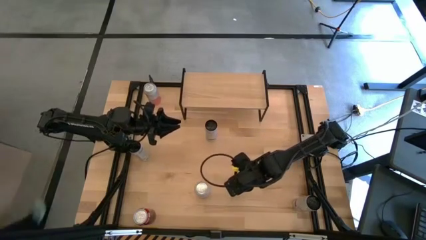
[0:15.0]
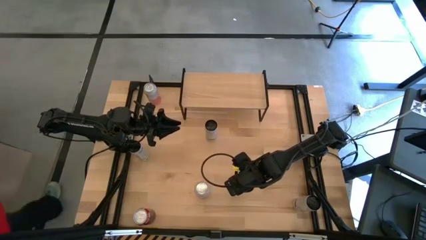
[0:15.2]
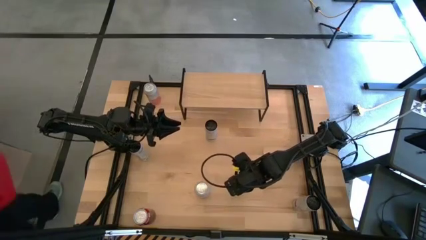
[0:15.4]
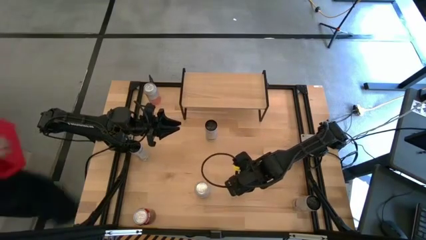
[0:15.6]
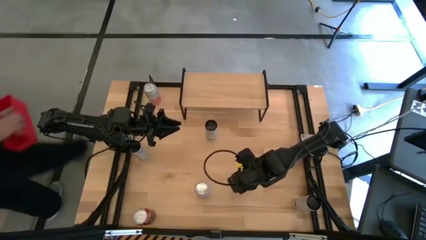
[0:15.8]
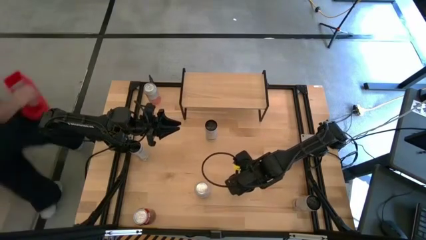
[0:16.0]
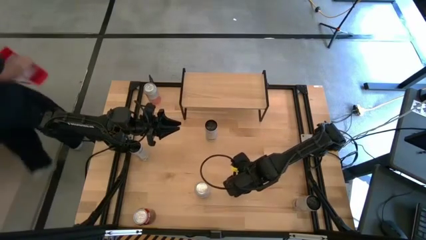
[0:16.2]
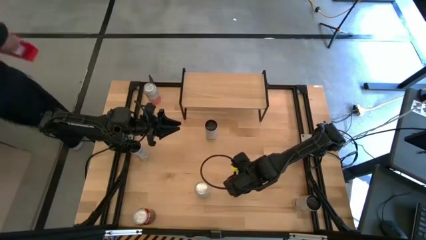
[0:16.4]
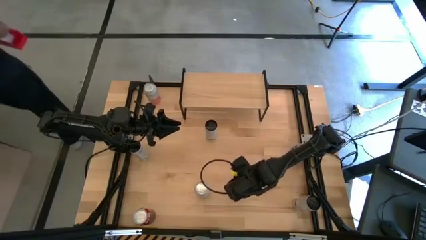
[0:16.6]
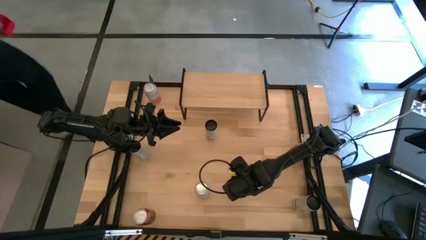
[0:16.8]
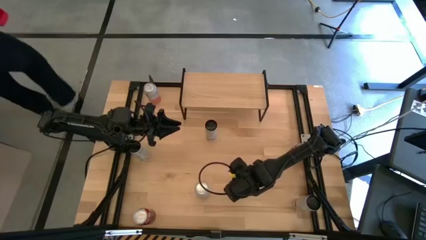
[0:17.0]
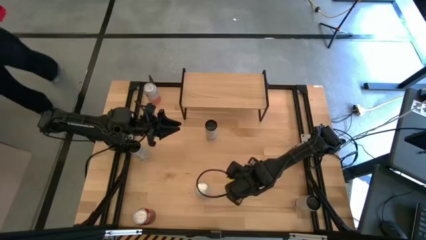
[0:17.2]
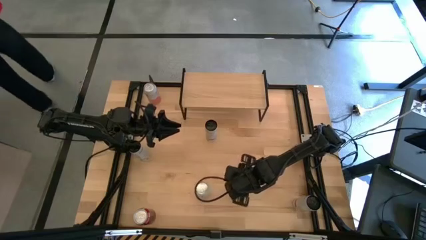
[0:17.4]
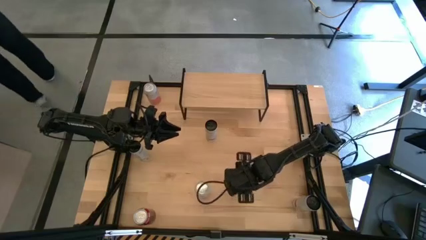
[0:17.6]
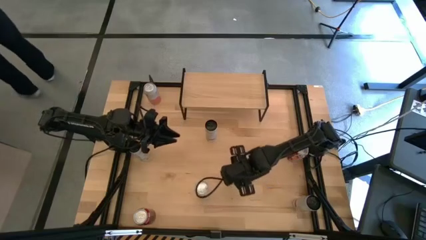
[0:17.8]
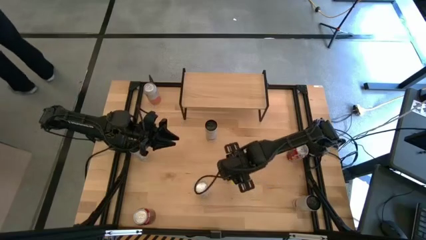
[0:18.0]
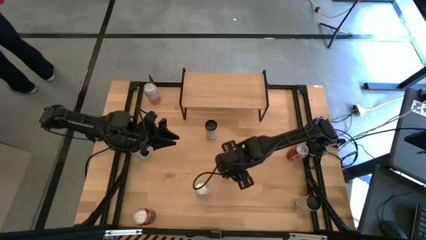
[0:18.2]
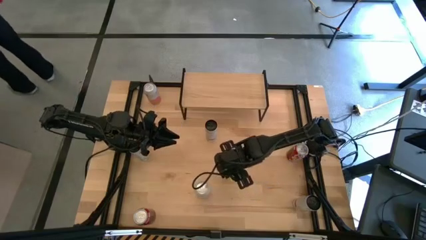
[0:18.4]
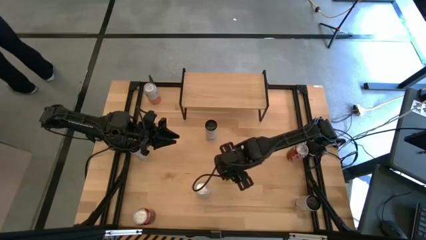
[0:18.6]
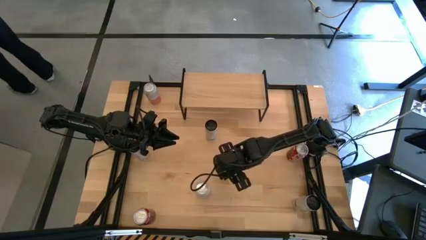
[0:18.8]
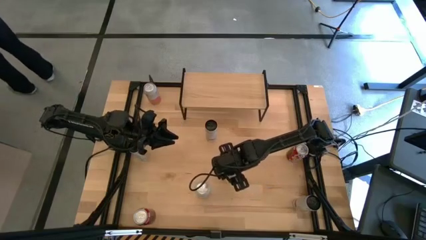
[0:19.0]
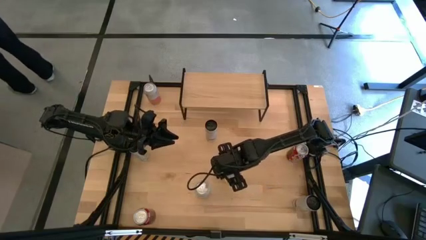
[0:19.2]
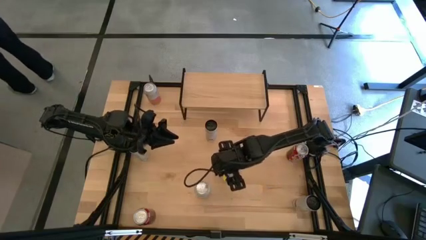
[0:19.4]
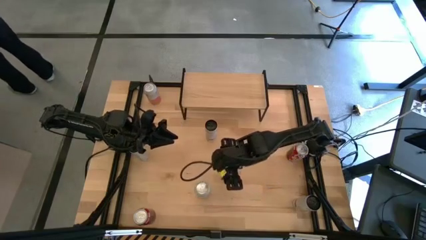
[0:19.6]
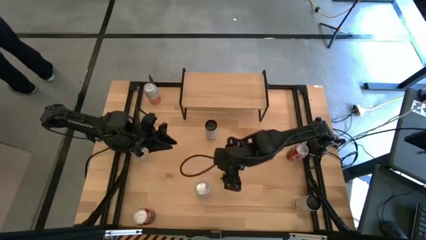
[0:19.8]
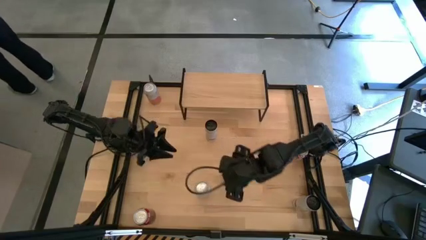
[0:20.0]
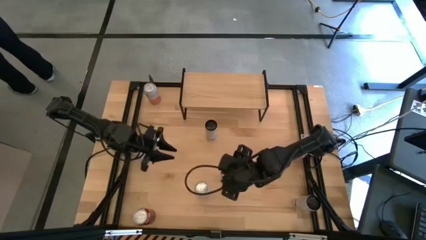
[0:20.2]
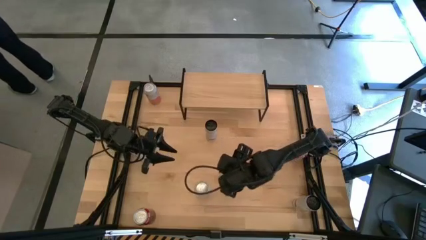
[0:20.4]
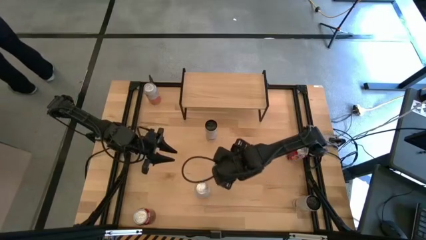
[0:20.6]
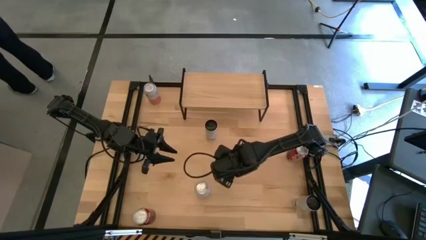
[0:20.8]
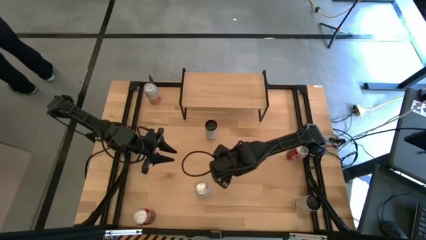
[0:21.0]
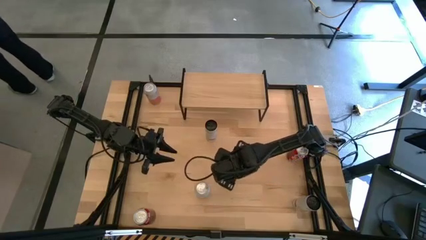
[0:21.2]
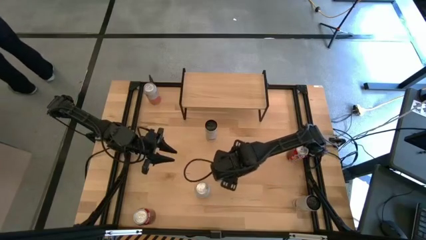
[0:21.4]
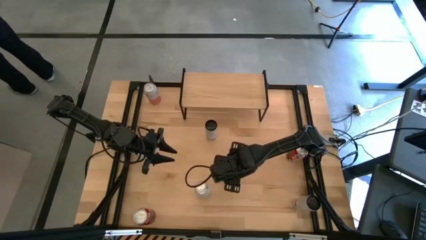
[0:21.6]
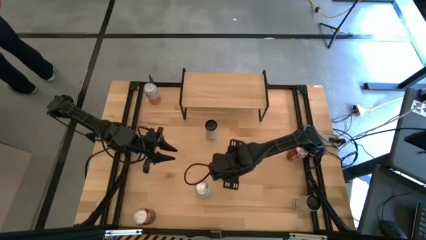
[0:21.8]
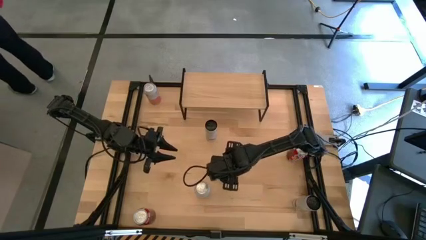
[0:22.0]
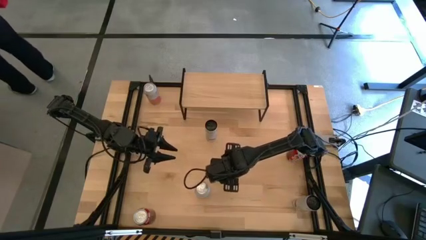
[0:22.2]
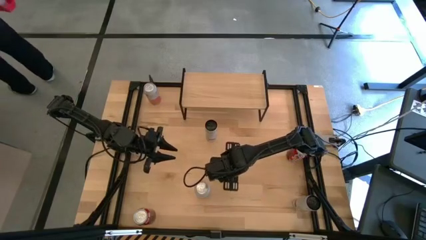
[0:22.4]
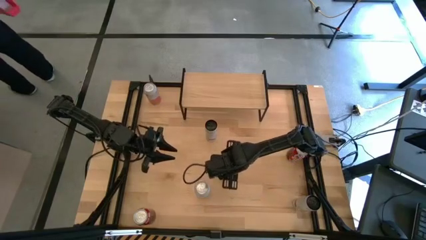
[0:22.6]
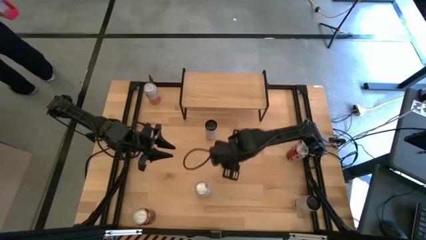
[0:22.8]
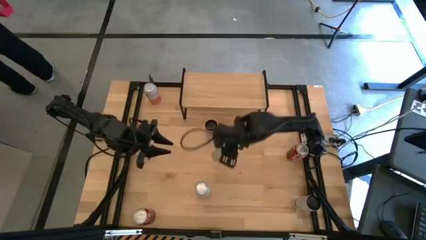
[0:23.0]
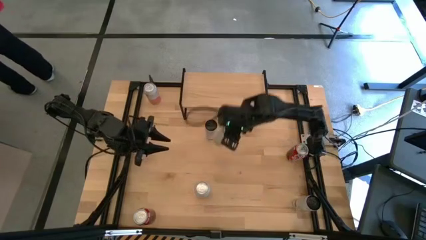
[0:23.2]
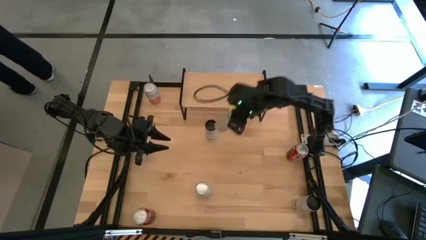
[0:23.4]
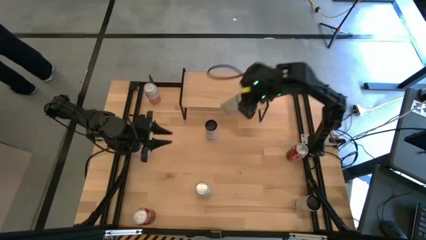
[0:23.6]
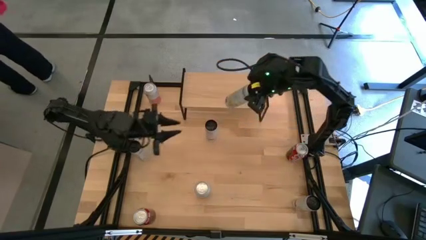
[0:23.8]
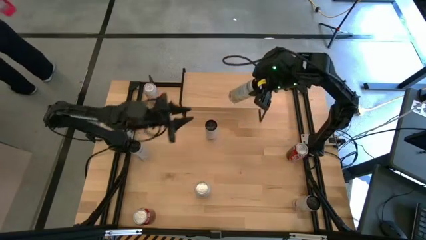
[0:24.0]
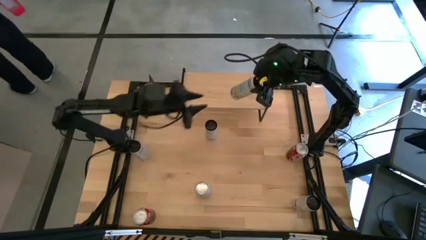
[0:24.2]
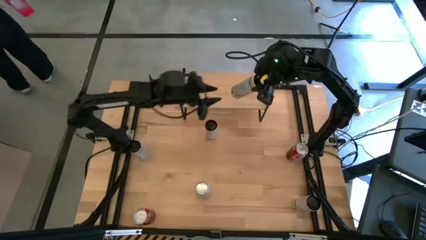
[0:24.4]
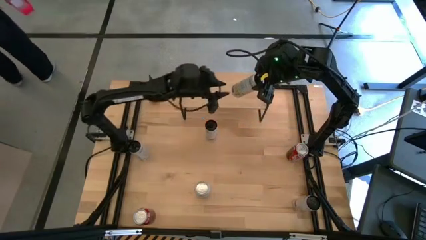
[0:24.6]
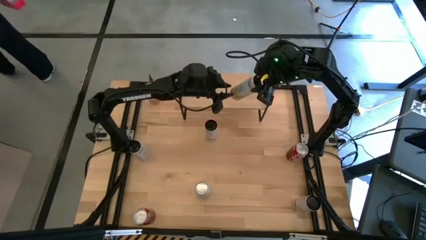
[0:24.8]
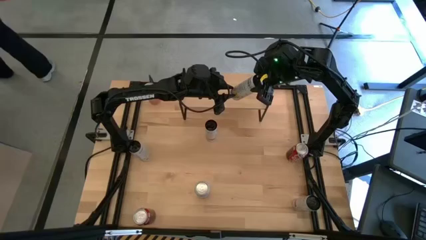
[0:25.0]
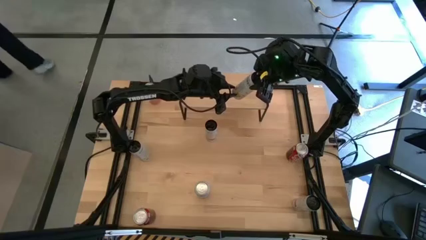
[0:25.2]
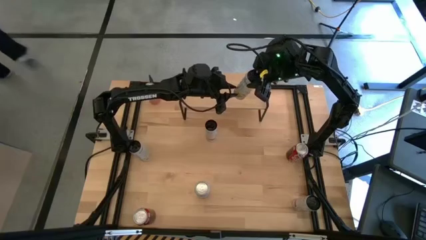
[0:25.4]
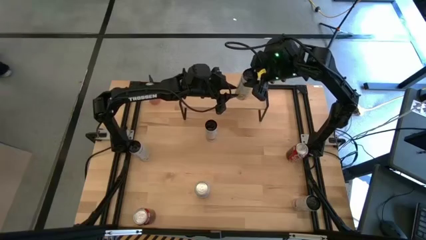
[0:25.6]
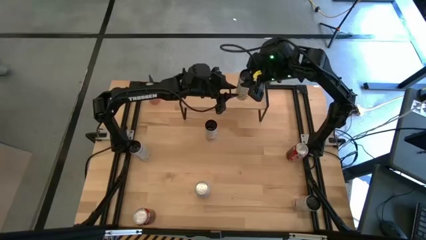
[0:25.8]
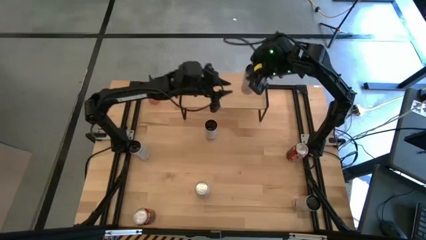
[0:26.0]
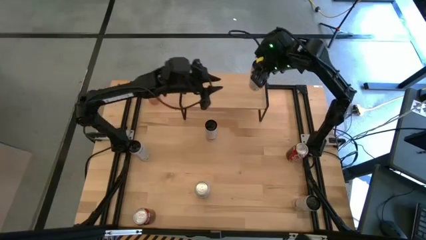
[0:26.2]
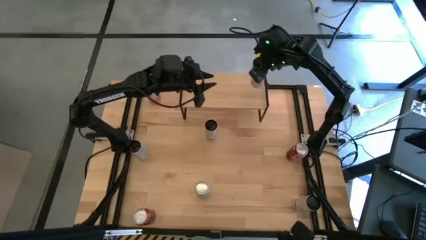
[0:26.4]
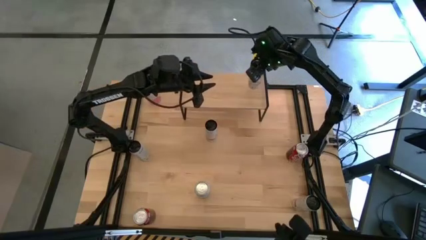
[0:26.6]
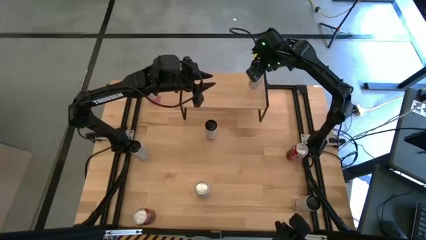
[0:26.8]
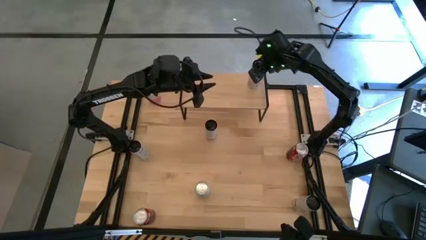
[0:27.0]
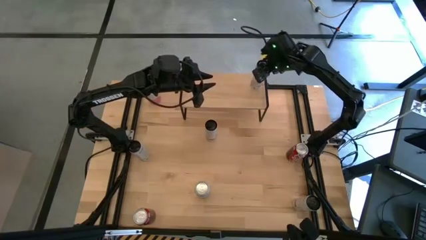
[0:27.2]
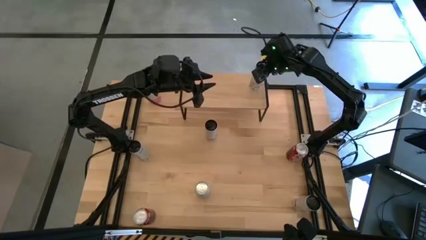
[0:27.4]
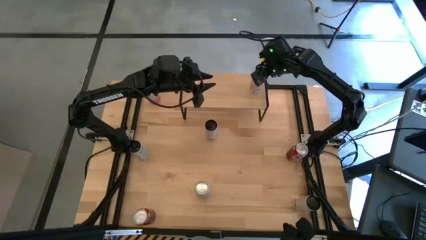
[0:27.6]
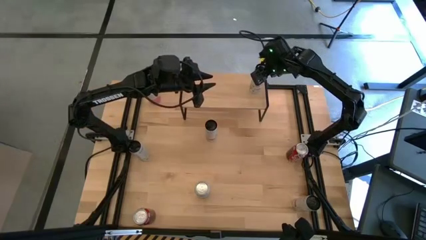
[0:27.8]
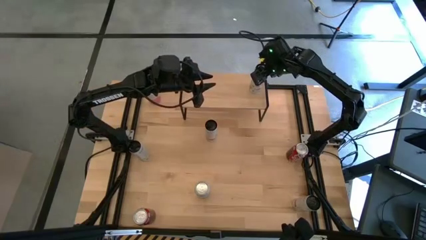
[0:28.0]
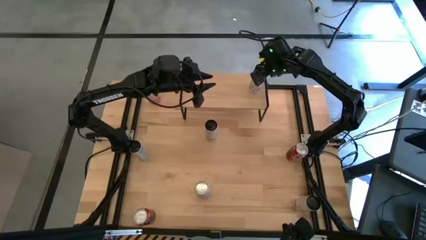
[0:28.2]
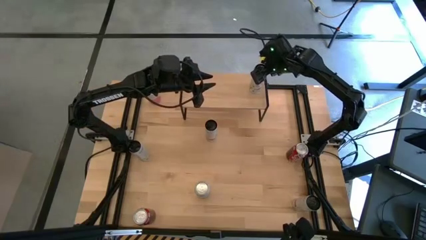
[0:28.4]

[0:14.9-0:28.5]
Task: Place canned beverage on shelf
Put the right white and yellow soda can on the shelf
